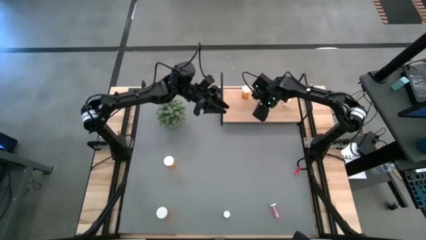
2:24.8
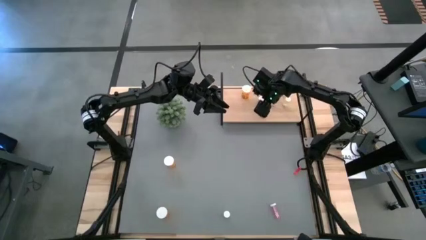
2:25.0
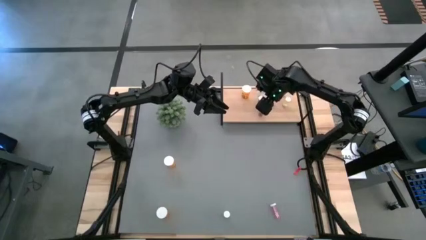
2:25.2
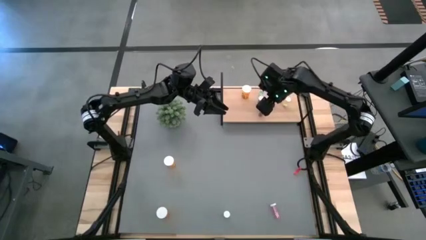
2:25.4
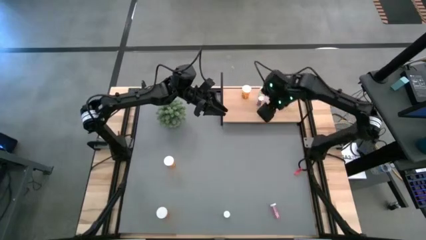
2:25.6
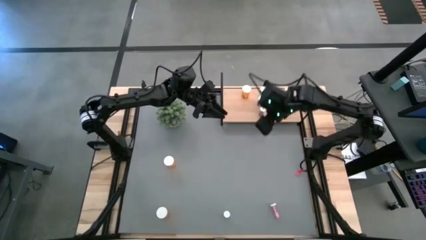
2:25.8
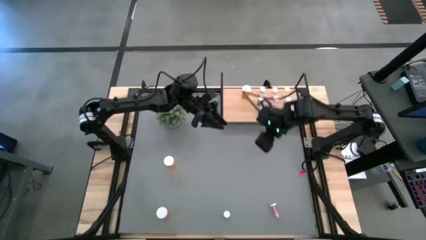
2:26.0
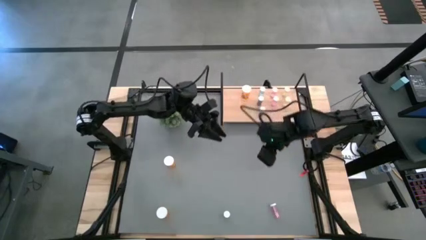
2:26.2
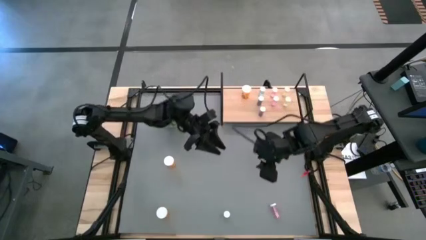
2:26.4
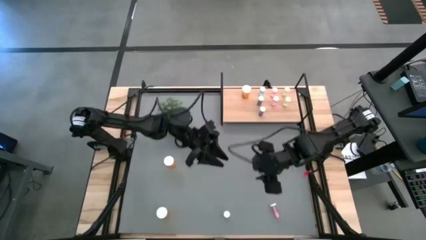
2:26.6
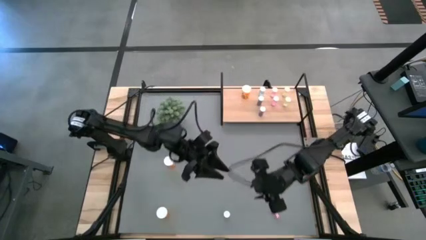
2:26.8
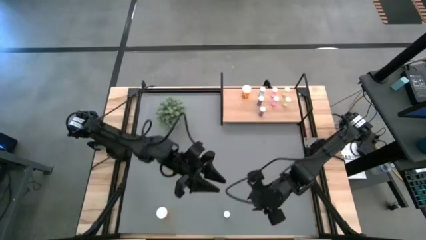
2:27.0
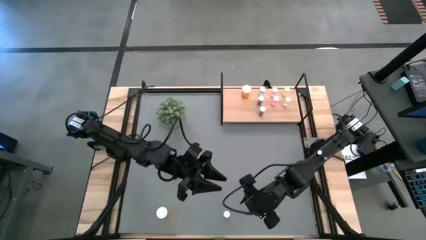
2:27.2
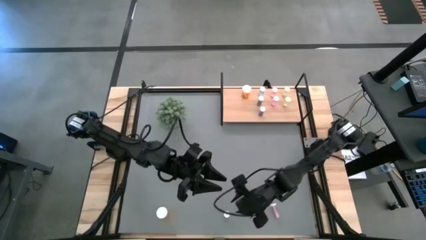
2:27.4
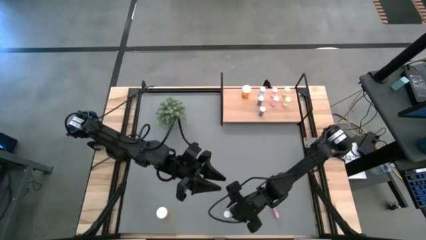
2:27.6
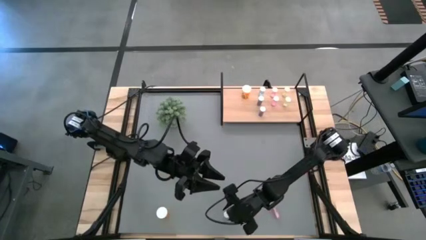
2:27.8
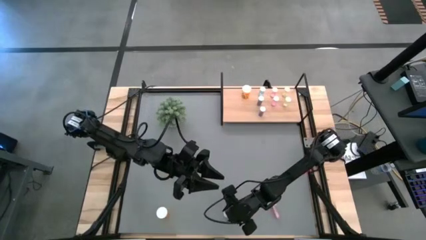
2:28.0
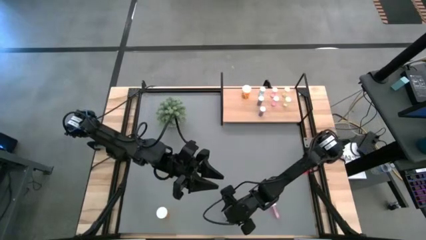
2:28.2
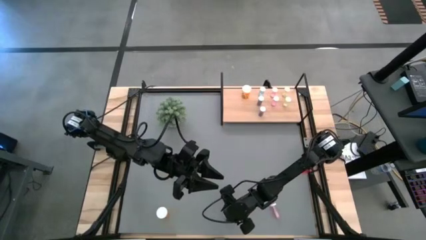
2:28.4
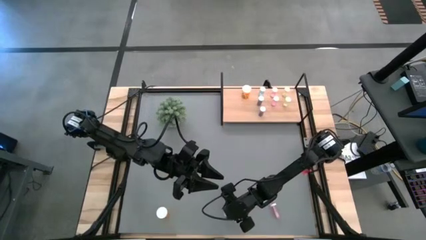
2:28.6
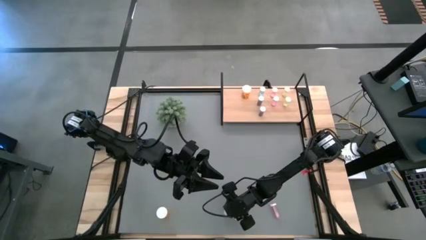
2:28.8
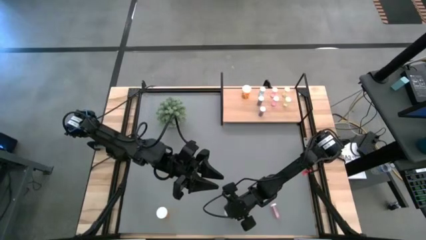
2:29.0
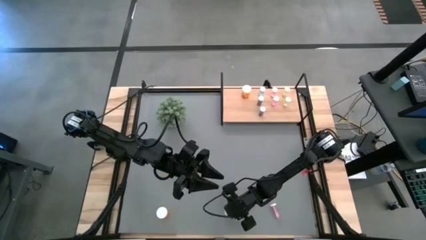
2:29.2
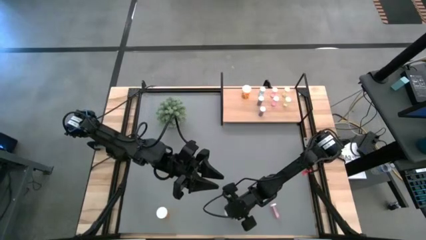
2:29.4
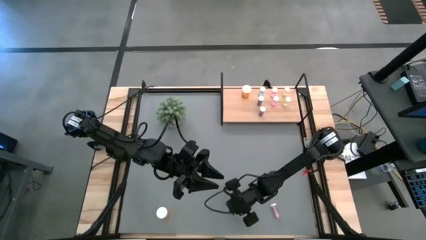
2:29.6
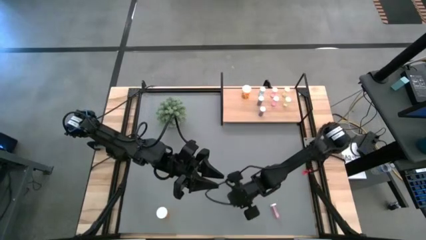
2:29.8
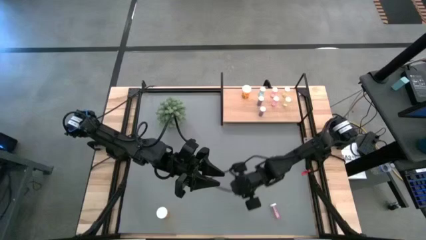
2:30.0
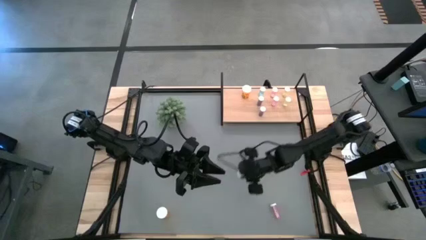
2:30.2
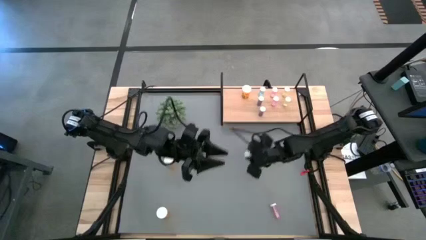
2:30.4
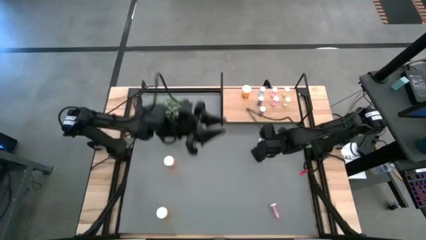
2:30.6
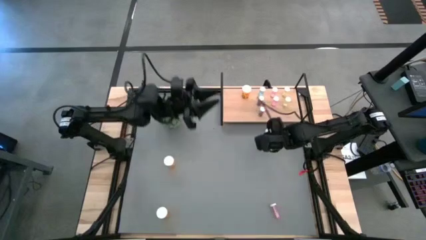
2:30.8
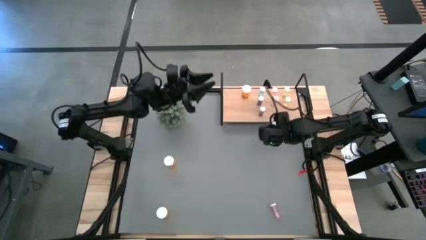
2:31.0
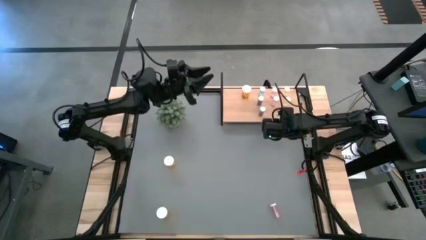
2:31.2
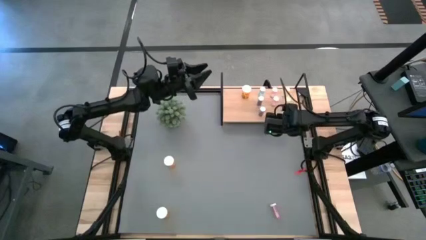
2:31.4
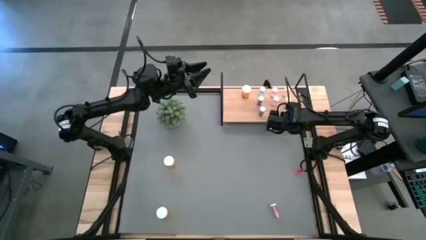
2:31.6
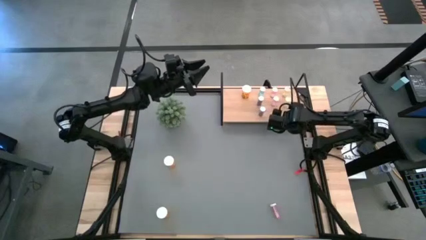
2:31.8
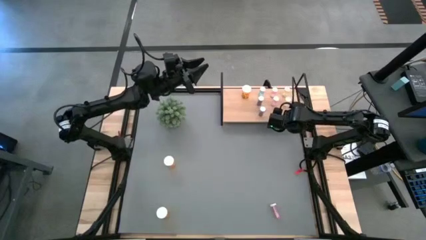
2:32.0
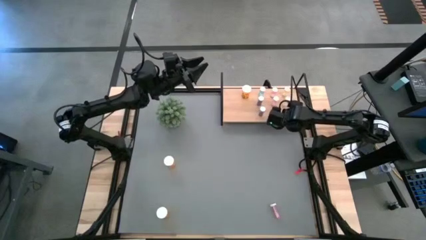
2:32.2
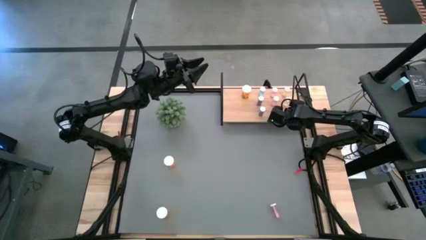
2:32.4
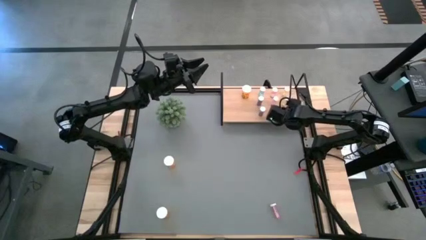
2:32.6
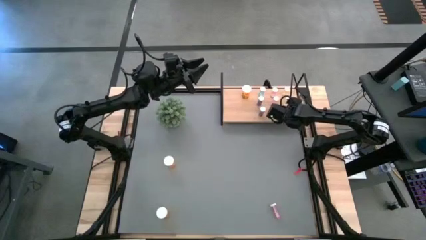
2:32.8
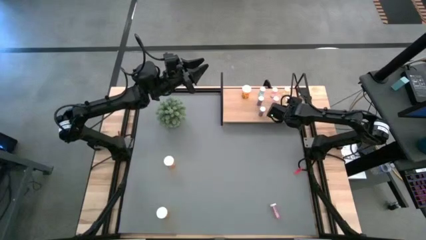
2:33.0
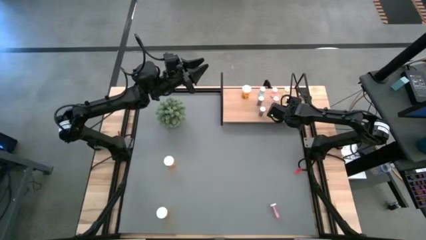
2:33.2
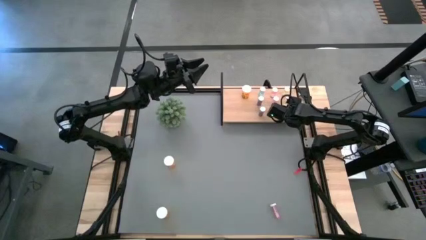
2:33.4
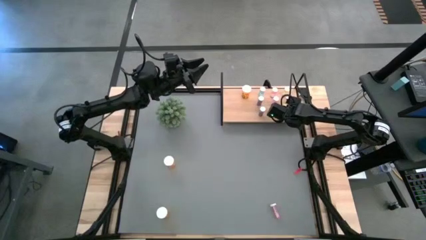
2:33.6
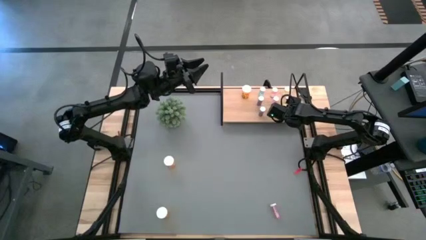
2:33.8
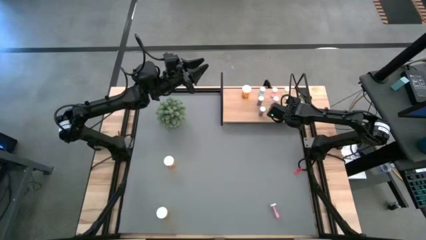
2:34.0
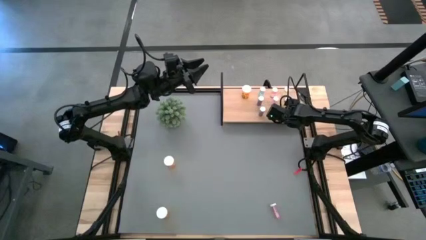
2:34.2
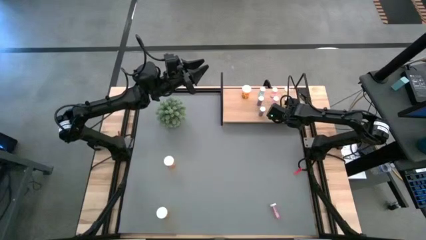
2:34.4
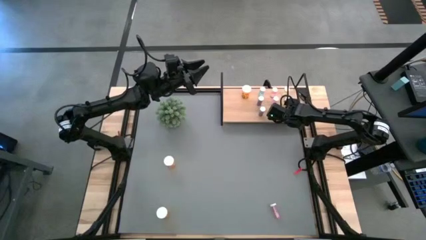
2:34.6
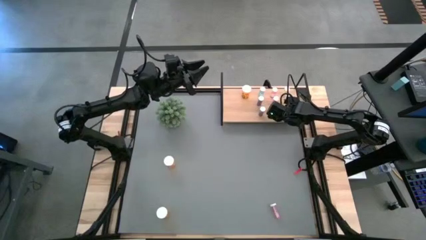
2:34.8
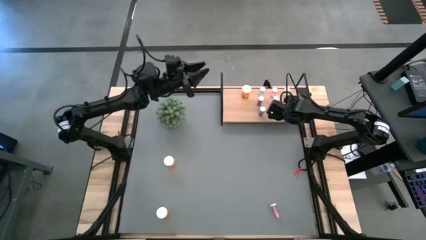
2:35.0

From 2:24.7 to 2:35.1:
Task: Pick and place medicine bottles onto shelf by color
Put the yellow pill bottle on the shelf aligned with the other yellow pill bottles
